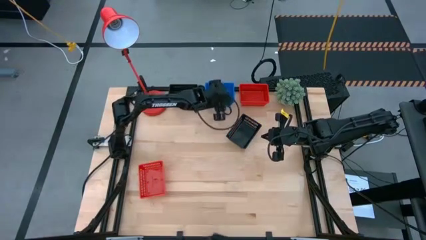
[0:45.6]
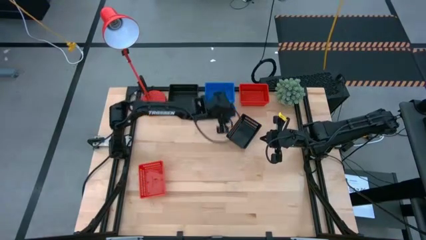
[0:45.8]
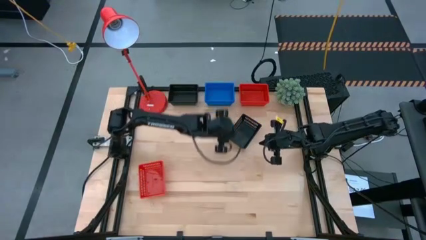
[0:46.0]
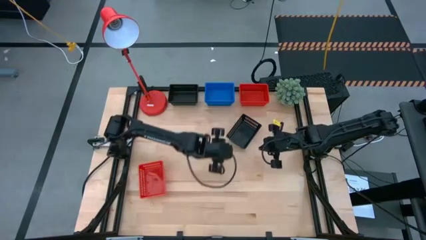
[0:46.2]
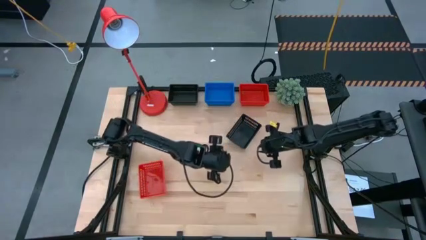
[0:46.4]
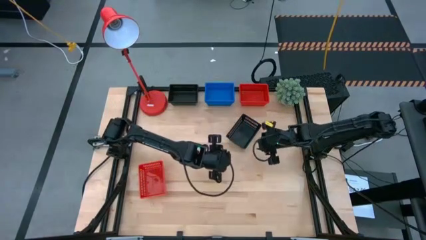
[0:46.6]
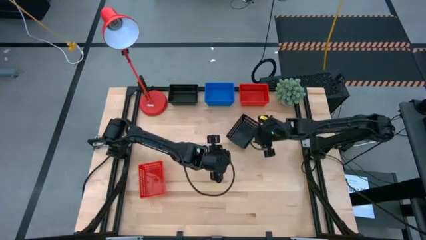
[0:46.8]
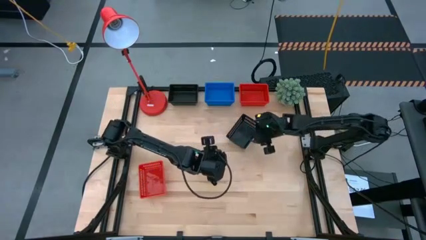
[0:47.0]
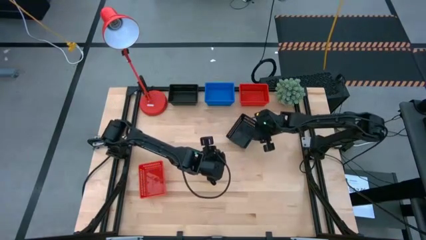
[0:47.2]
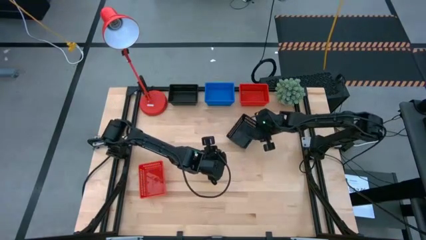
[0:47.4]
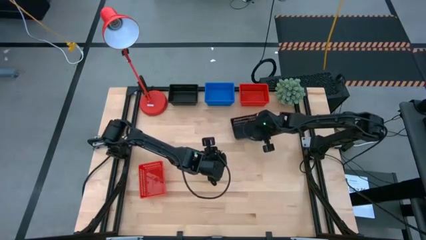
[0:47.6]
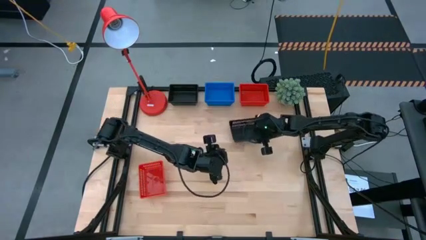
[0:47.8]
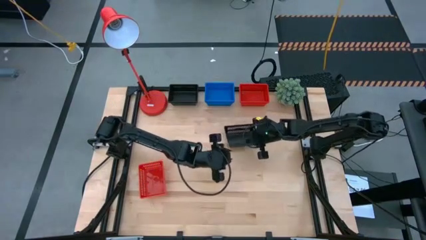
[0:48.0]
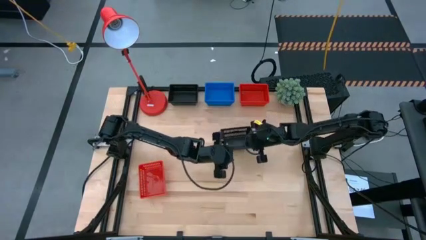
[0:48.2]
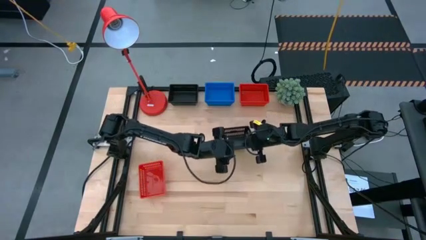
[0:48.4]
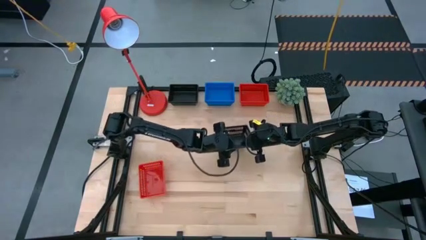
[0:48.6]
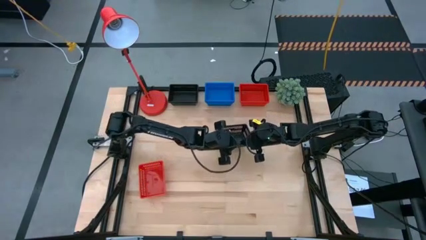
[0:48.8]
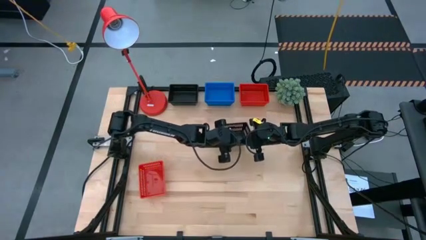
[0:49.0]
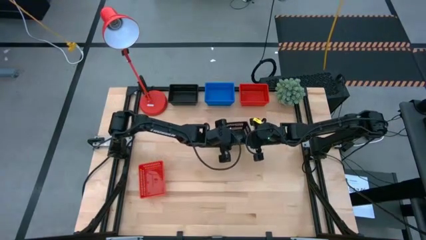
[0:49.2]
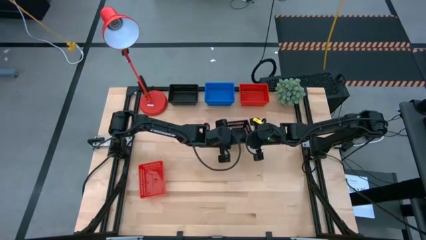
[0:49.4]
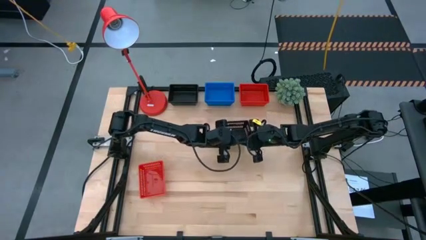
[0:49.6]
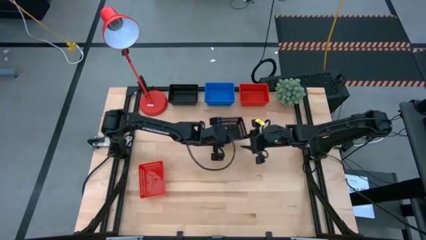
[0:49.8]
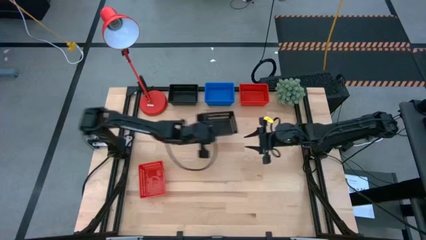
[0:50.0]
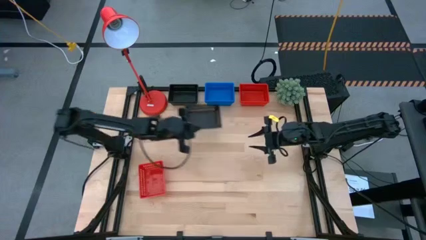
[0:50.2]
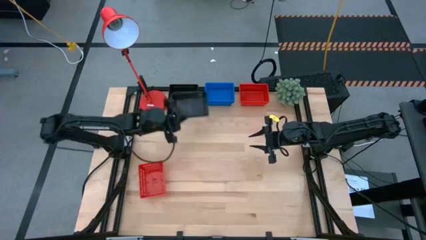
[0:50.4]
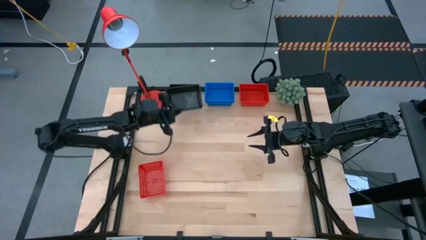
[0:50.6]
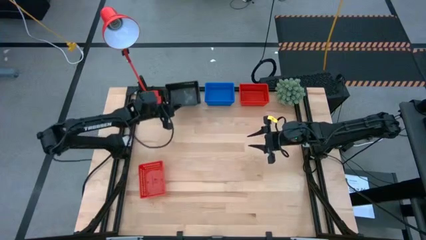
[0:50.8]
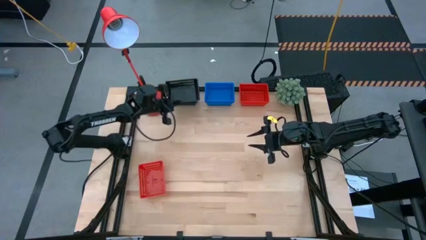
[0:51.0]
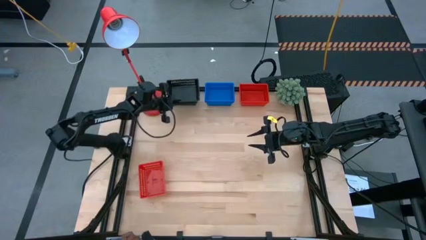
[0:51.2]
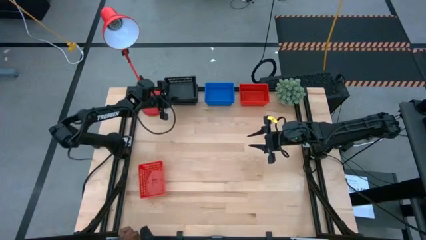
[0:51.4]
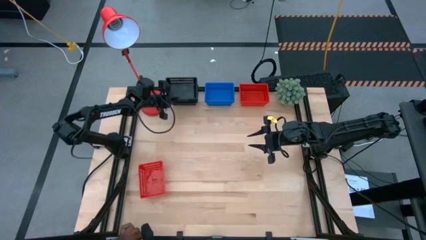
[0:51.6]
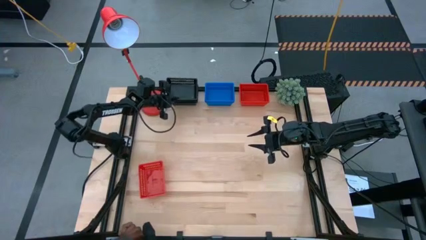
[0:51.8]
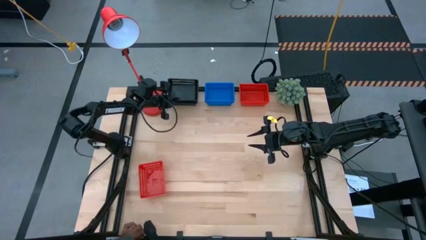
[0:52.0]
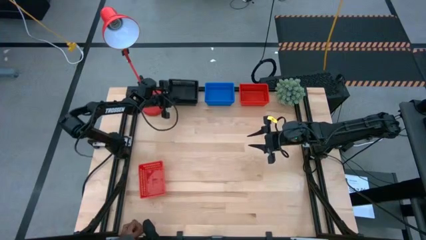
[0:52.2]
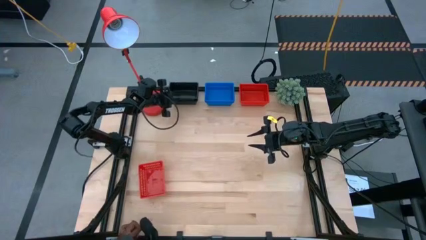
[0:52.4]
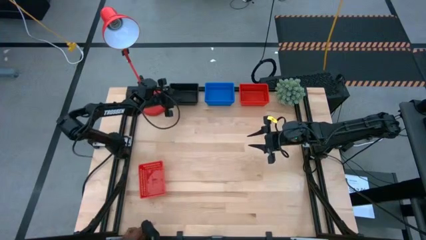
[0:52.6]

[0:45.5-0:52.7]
Stack the bottom black bin on the top stacked black bins
